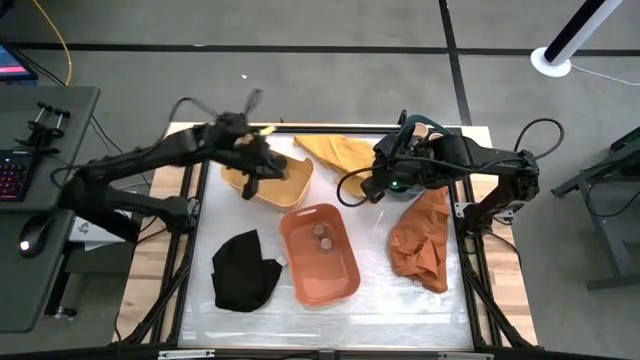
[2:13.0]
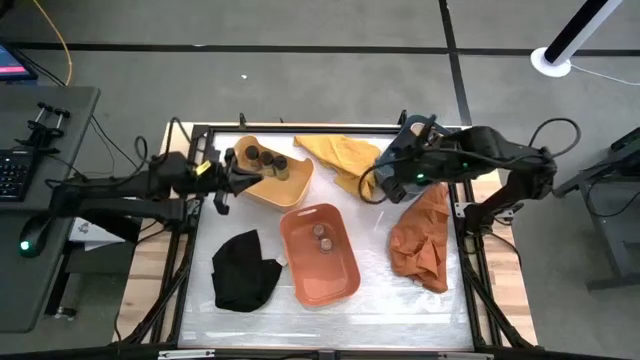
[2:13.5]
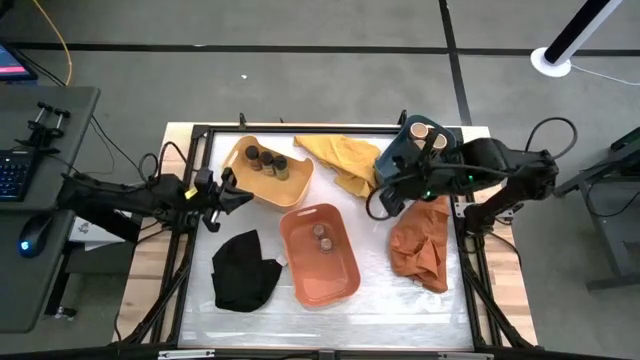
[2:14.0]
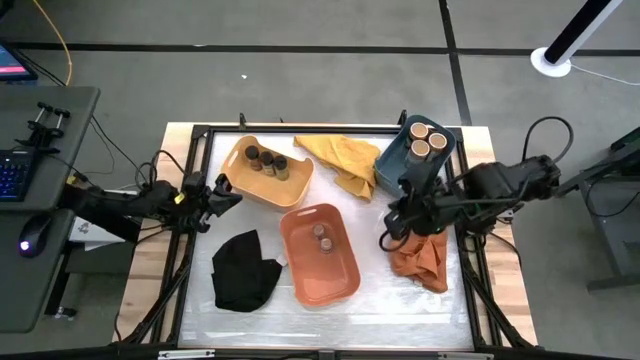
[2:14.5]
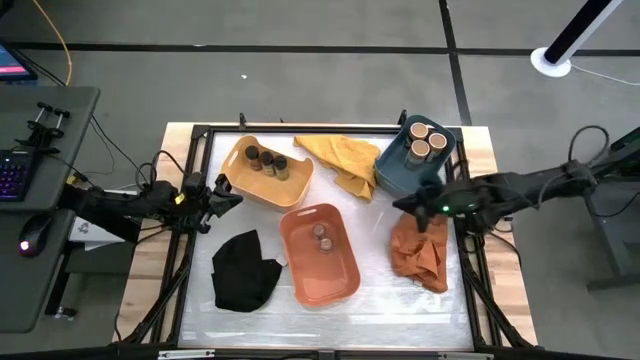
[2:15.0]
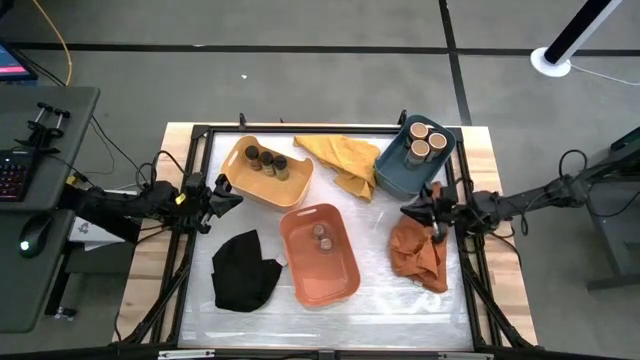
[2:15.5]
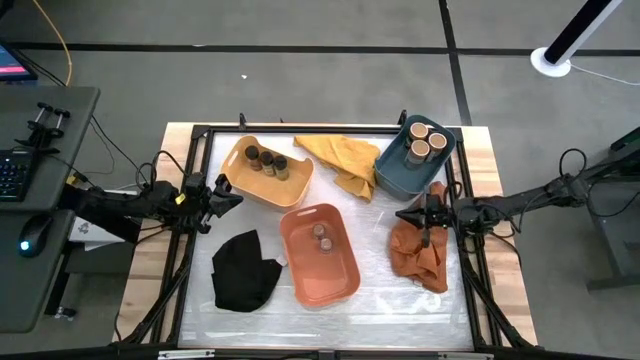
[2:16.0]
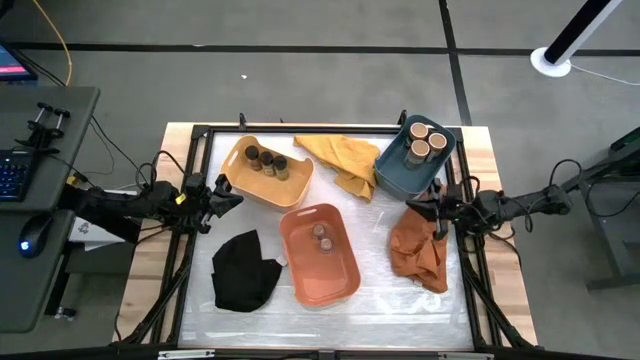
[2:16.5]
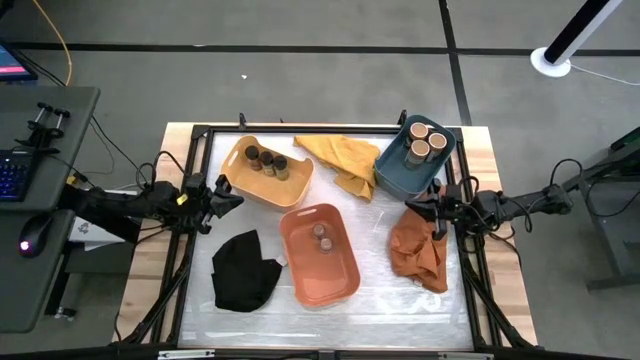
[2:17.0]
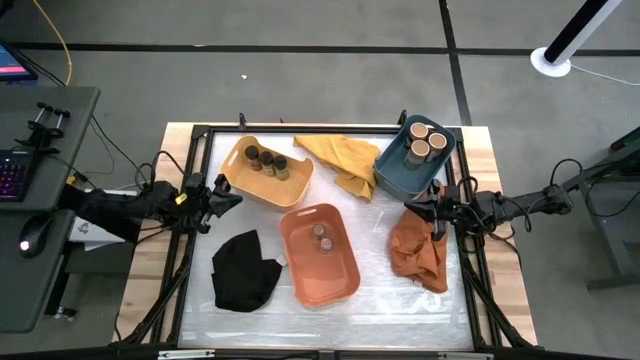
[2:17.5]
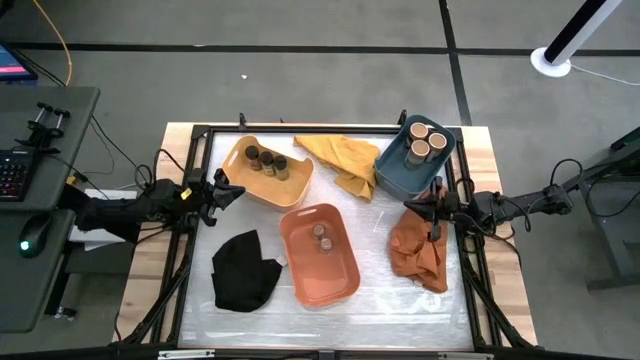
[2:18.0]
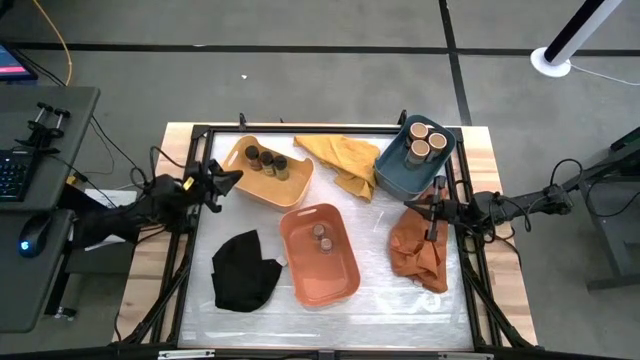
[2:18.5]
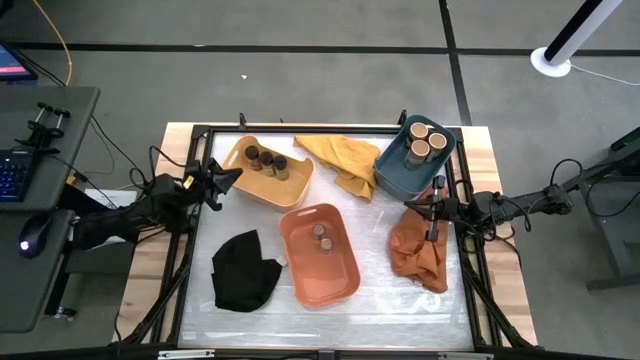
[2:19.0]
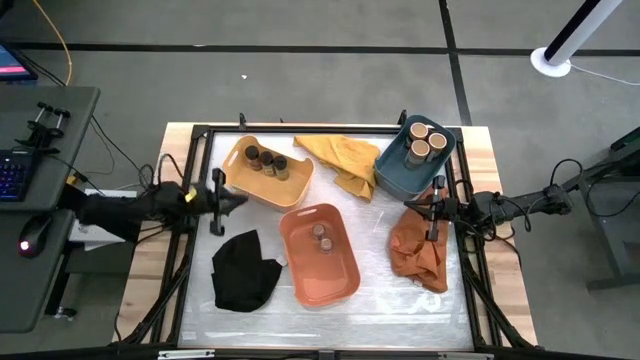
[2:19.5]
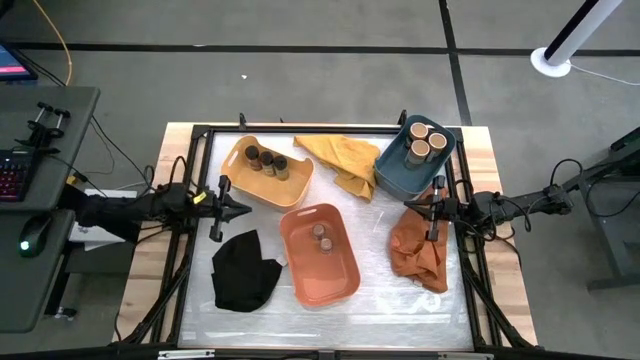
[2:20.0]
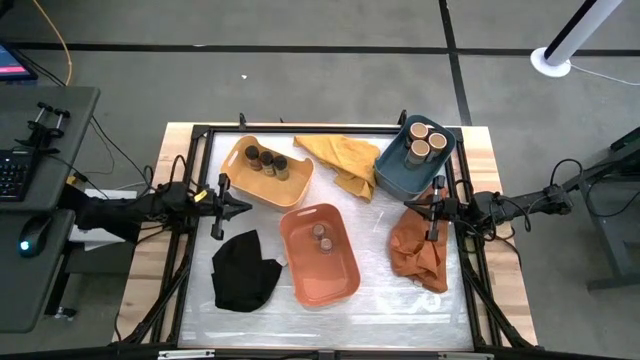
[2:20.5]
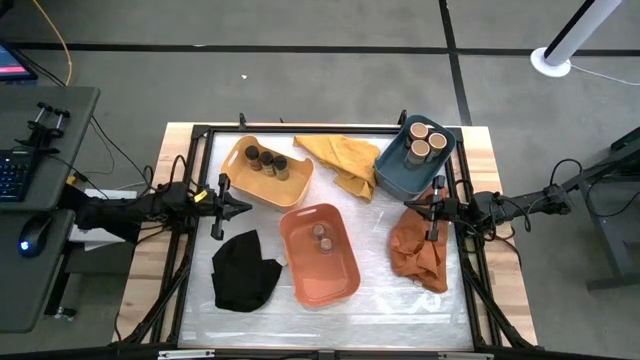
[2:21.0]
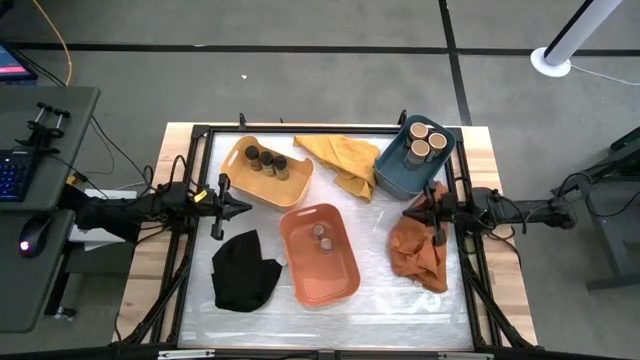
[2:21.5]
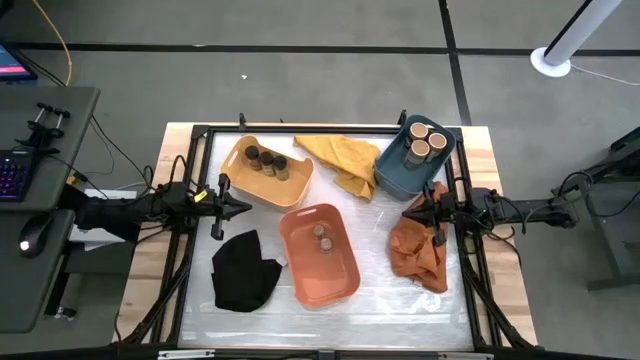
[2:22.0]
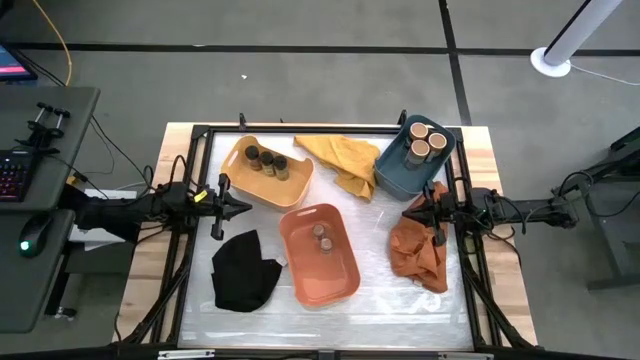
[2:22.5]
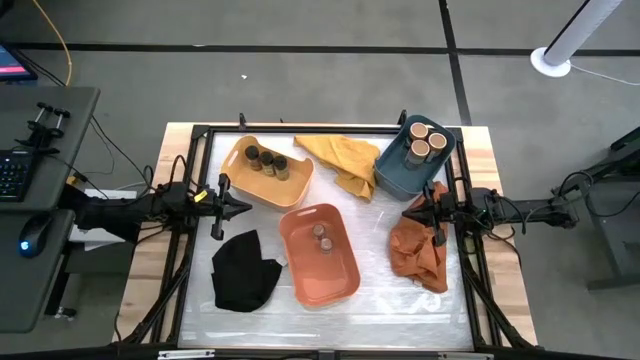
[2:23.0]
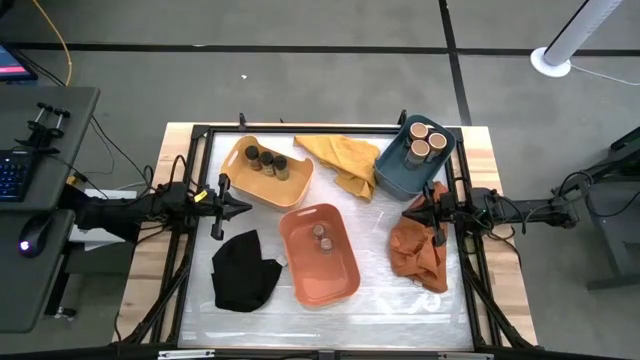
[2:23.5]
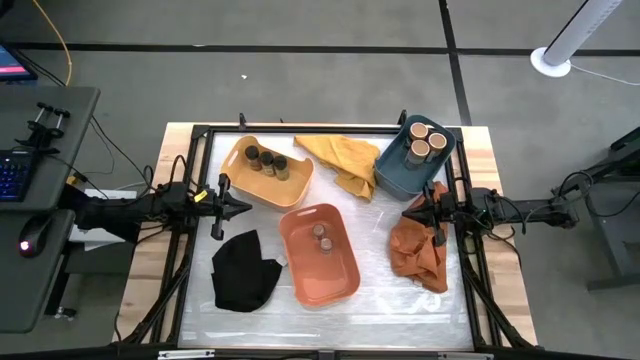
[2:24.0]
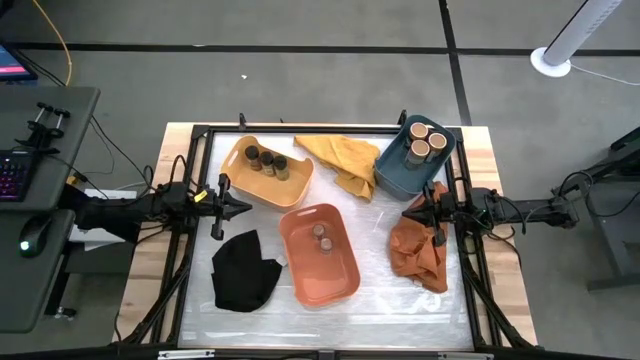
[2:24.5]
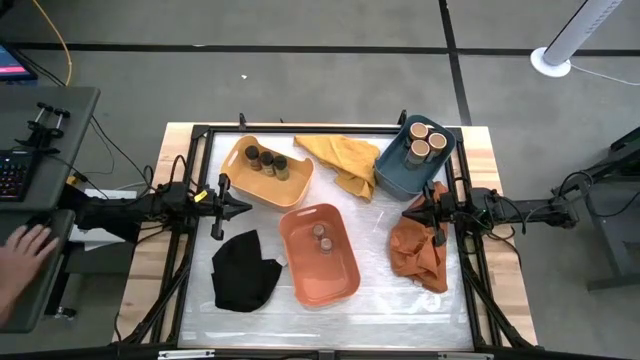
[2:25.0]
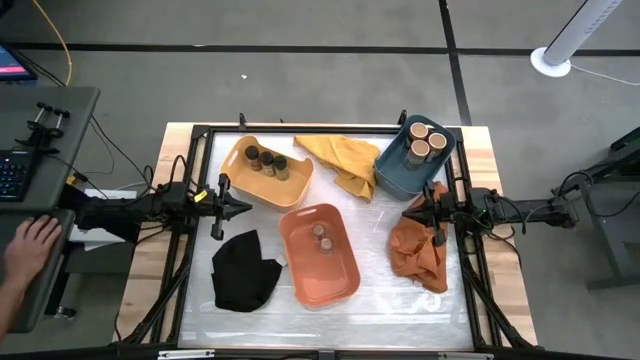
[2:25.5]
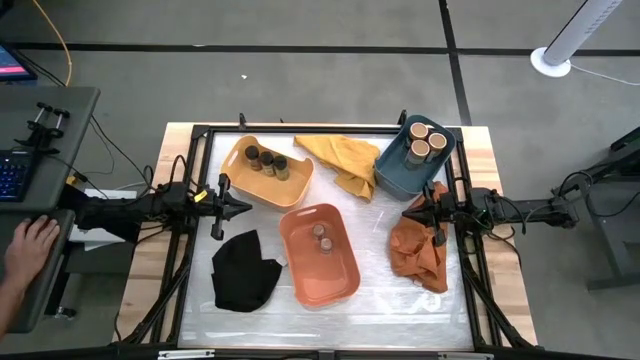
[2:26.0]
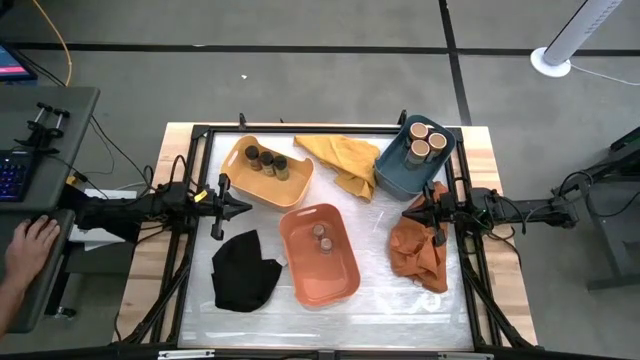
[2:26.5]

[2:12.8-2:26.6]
Task: Sort spices by type
Return to Home Position

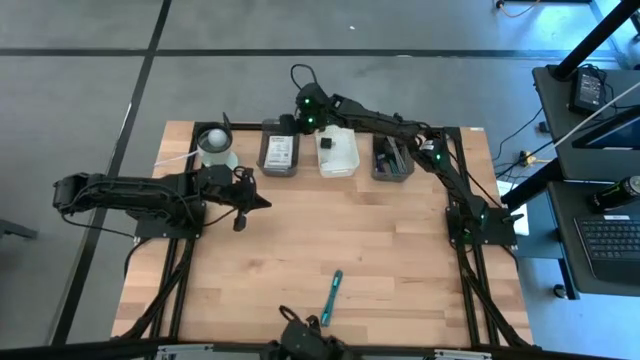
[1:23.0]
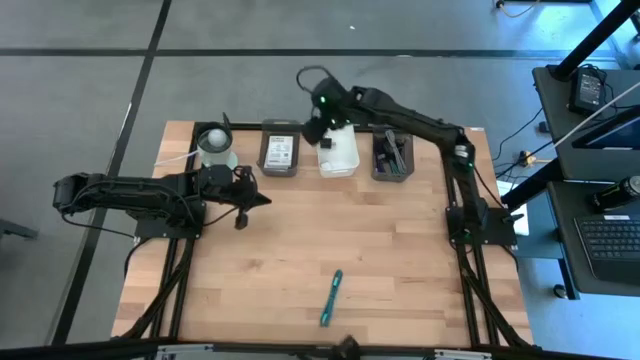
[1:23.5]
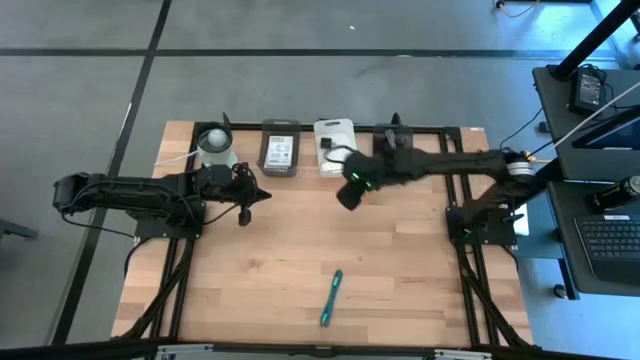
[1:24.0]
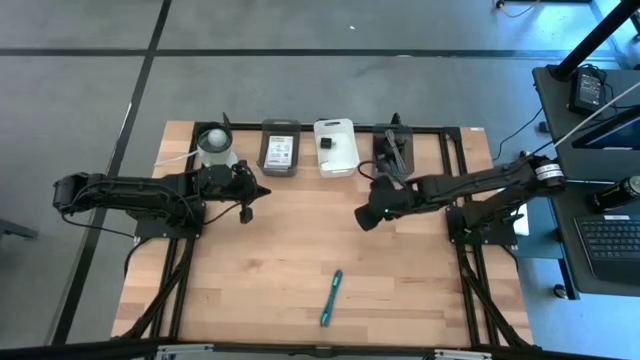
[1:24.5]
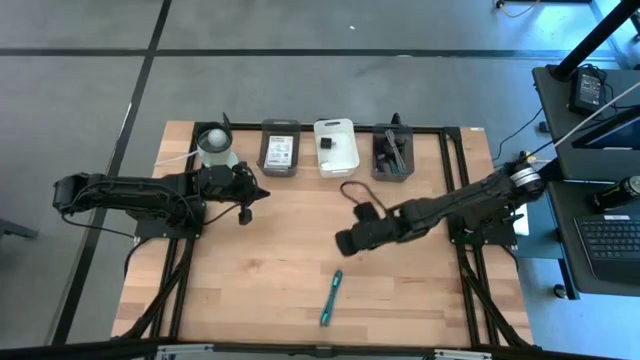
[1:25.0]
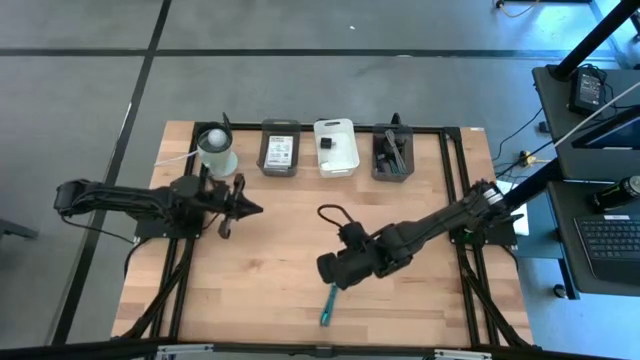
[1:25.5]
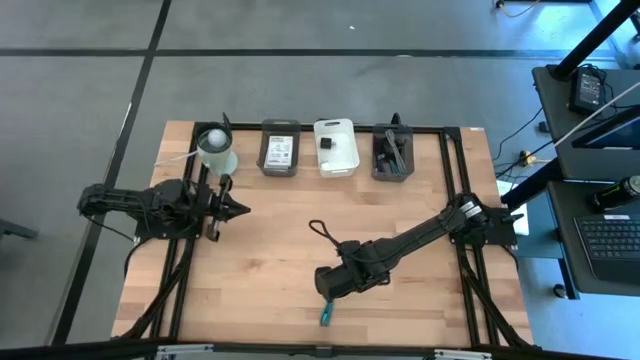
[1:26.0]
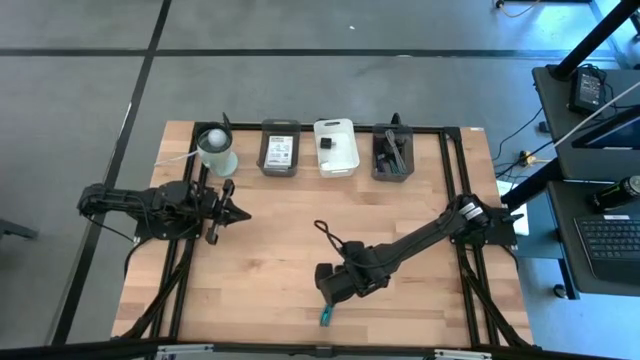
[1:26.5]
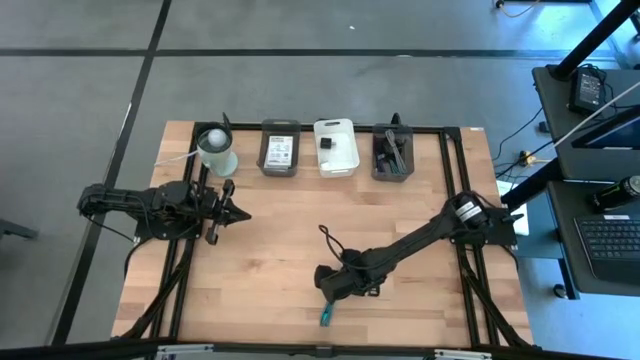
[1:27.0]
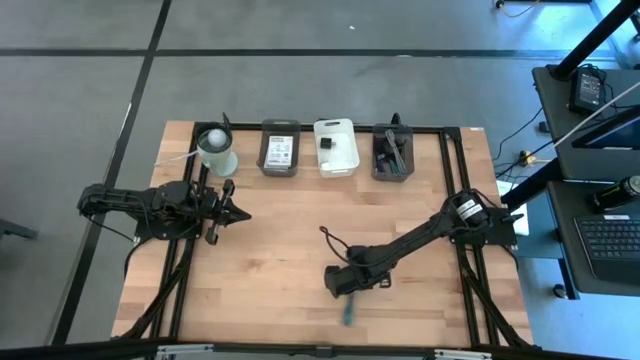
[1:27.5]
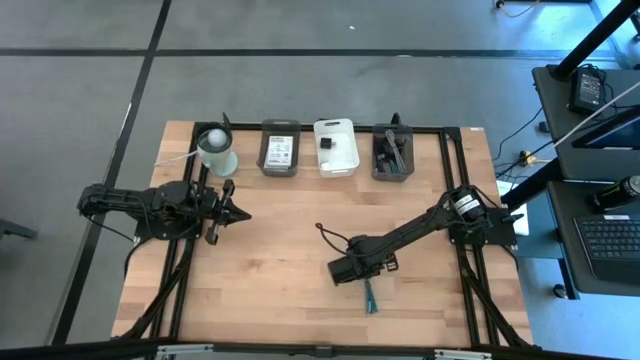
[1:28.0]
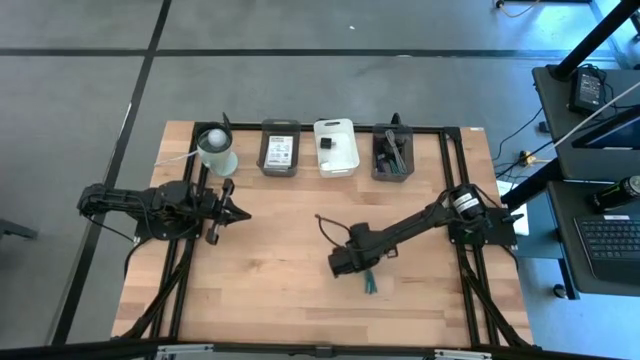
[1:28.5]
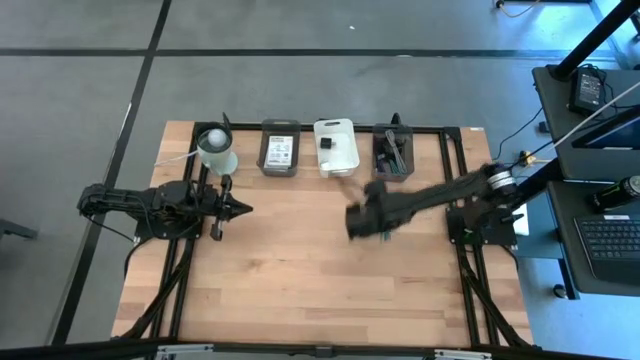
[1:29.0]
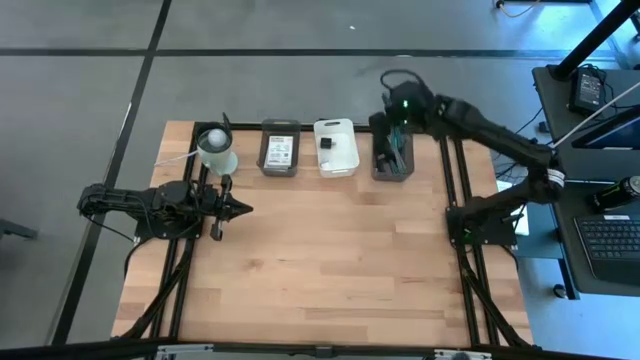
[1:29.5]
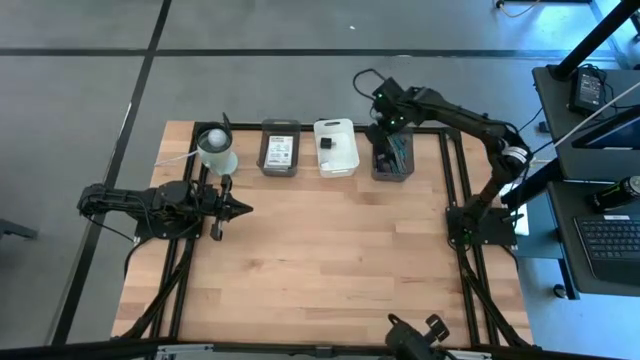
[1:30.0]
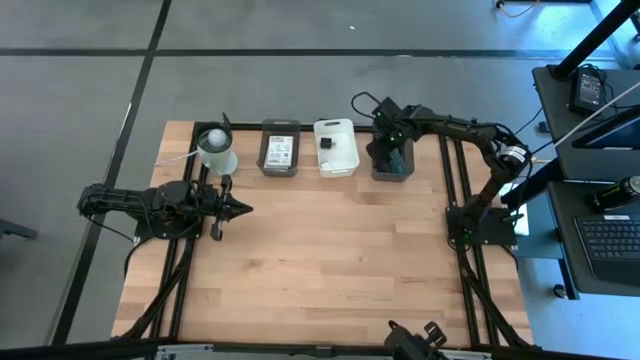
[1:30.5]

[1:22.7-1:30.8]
Task: Pick and place items into bin
Put the blue charger cable into the right black bin
